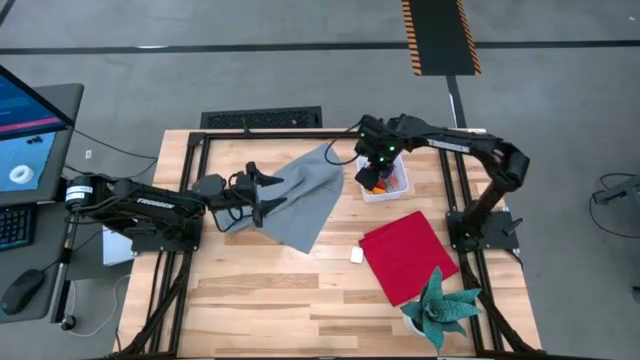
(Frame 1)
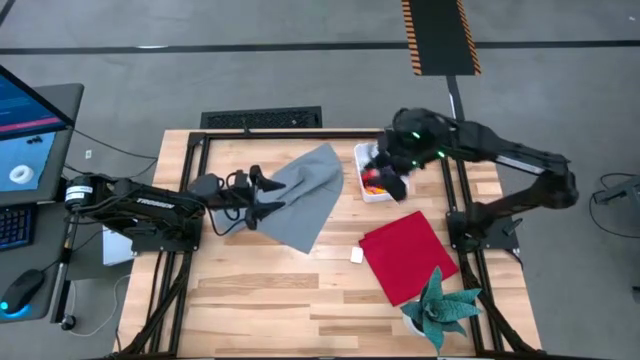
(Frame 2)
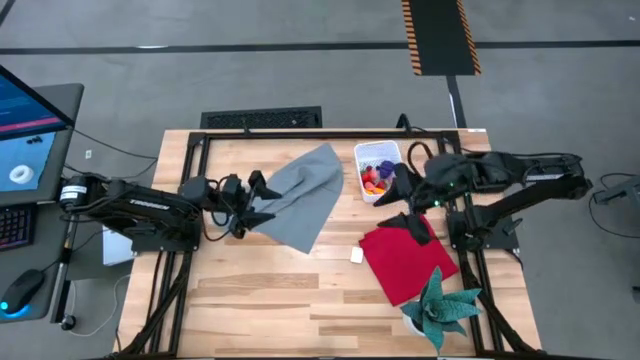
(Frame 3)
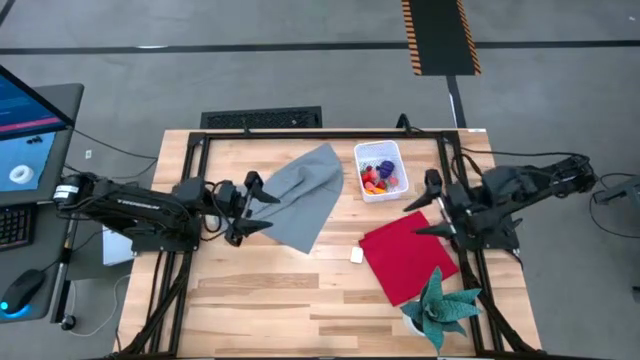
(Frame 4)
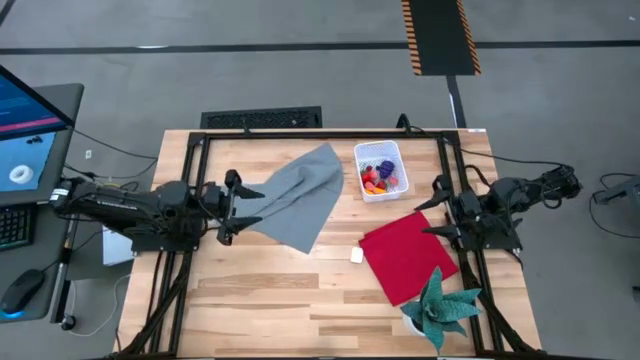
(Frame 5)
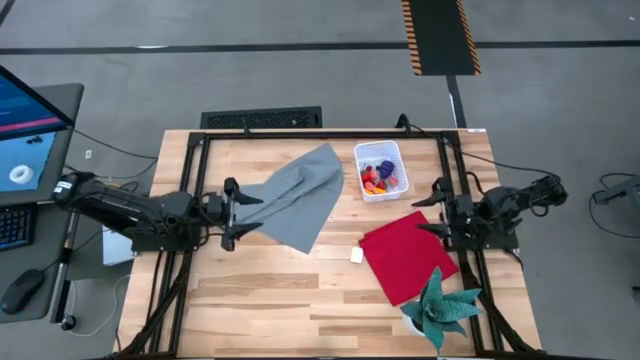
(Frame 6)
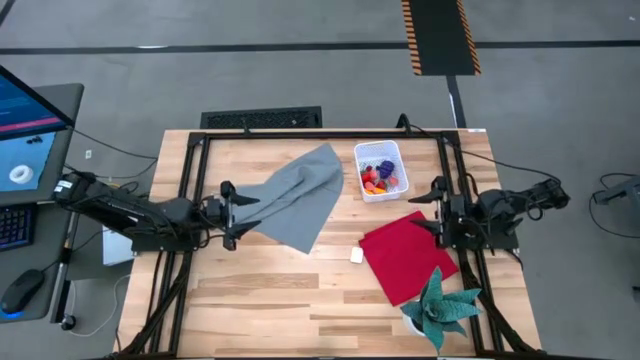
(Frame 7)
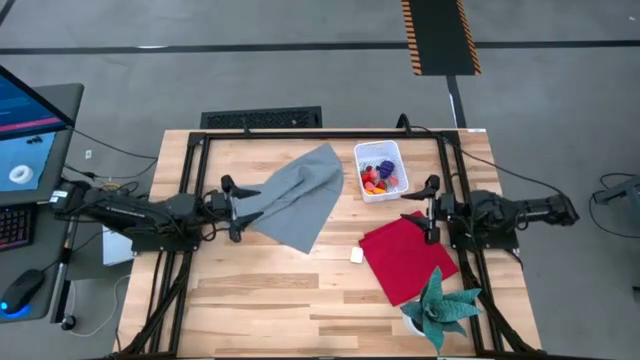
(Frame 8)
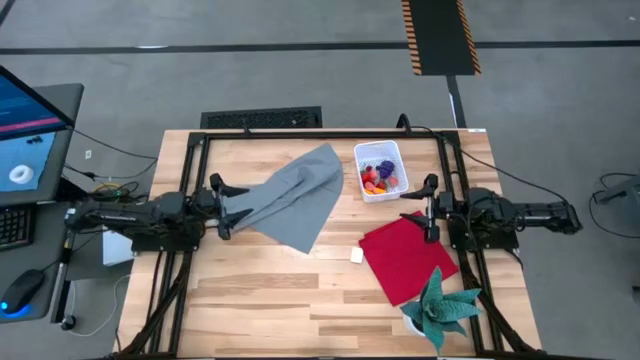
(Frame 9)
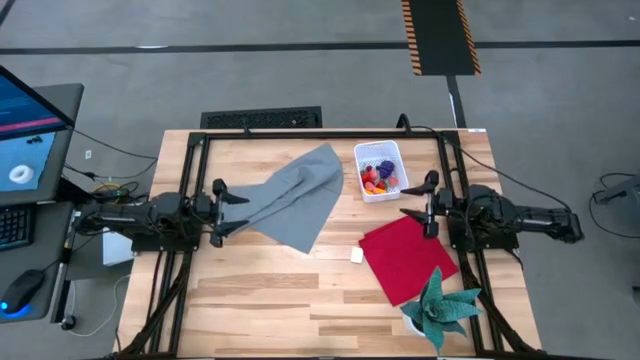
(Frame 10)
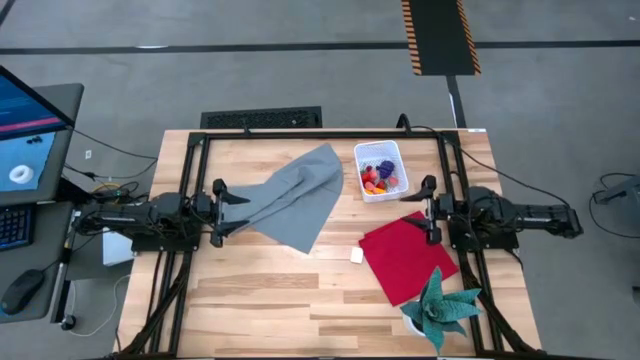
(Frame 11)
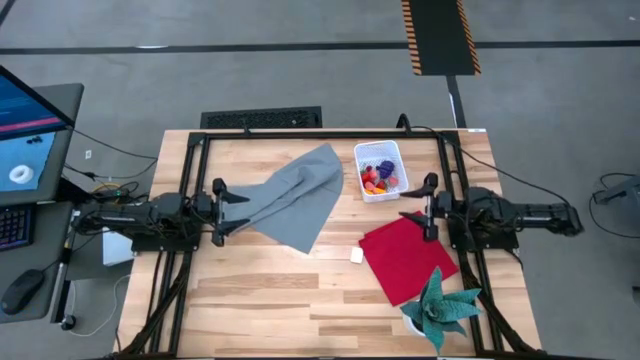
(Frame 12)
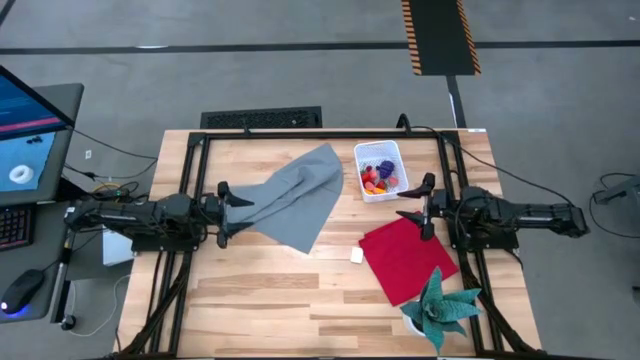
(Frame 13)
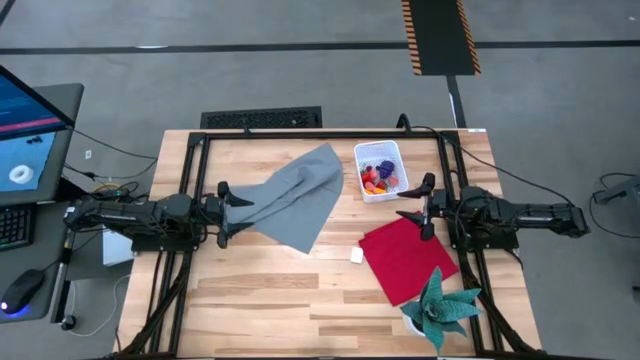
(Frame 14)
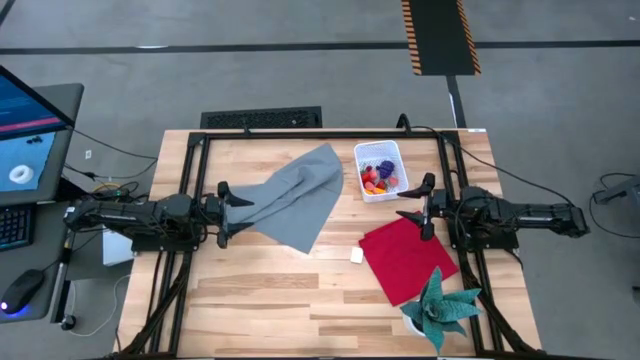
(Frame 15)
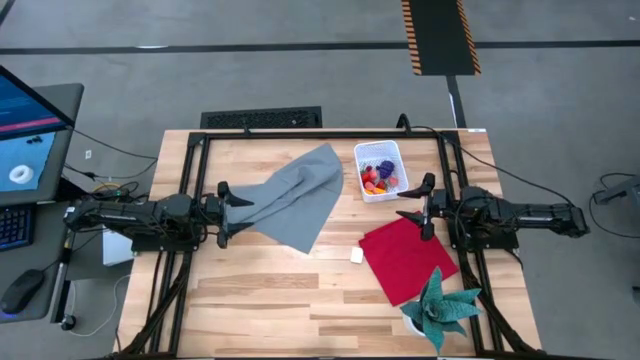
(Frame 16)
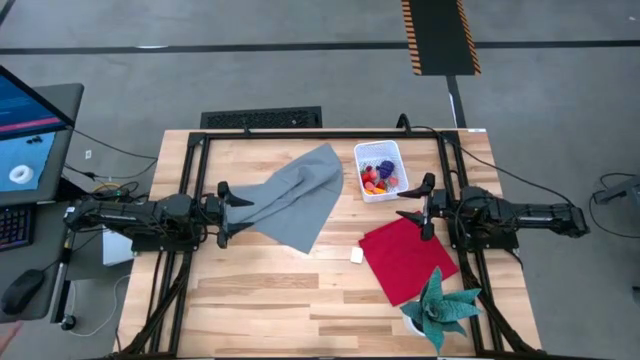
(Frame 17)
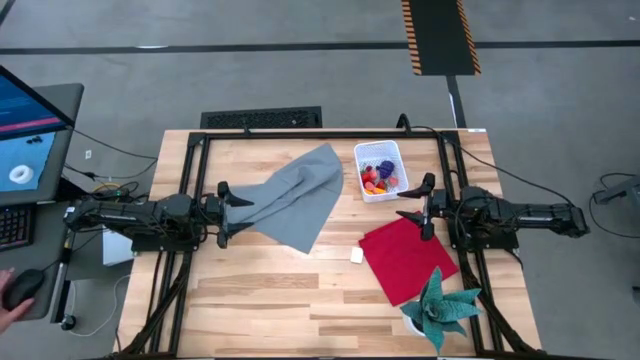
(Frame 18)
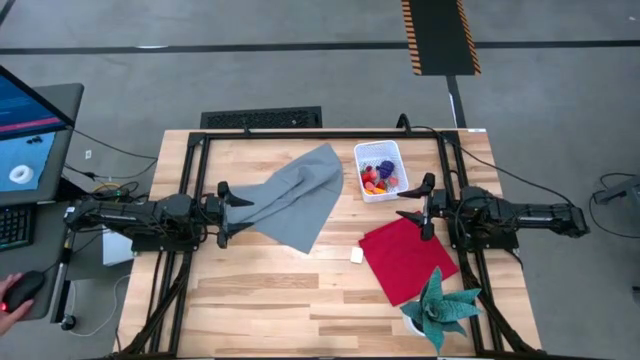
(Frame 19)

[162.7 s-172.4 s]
Task: Pick and placing Produce into tupperware
Return to Home Position

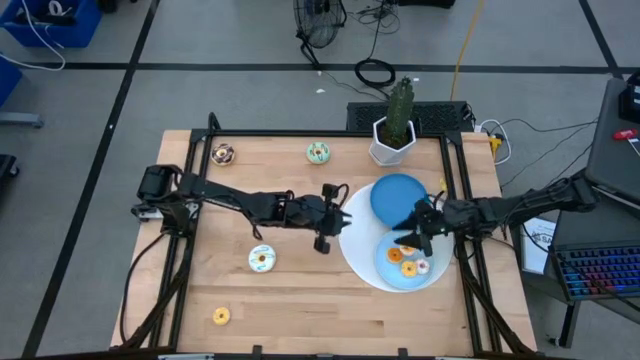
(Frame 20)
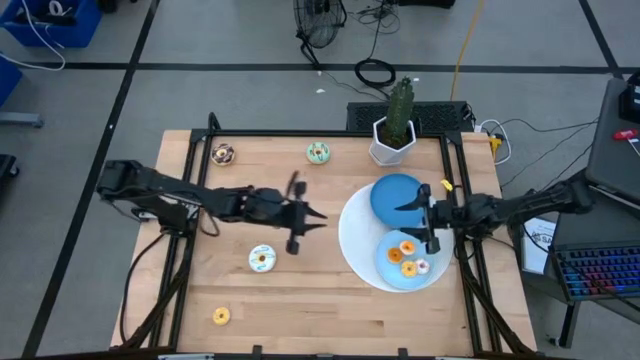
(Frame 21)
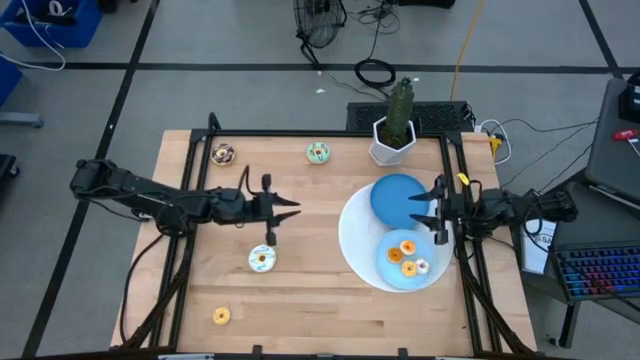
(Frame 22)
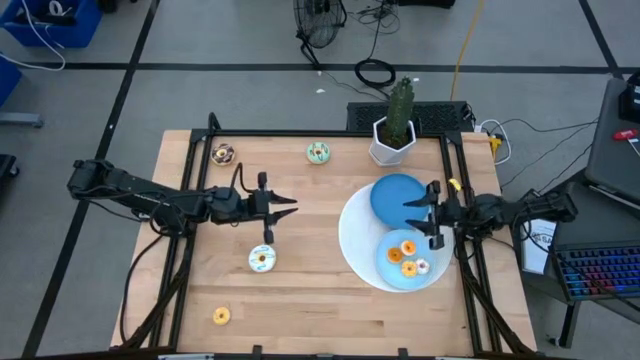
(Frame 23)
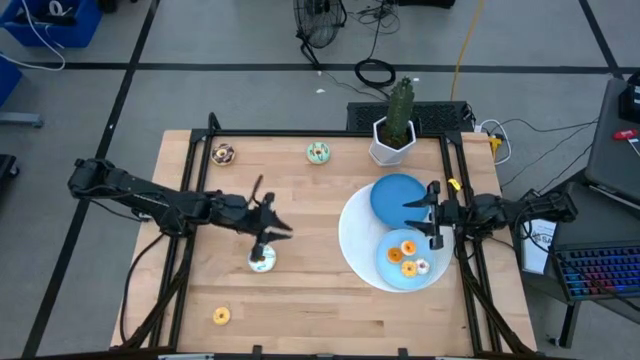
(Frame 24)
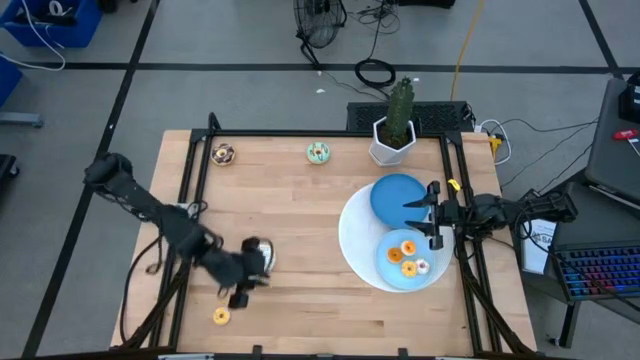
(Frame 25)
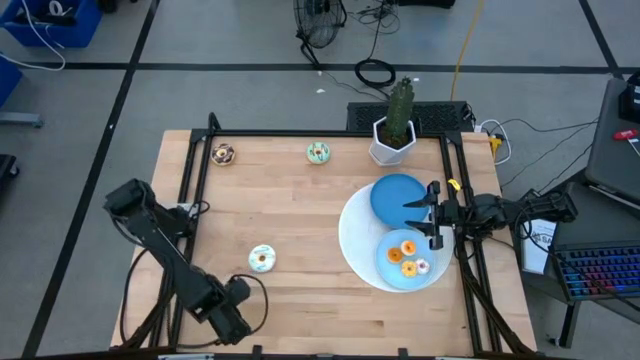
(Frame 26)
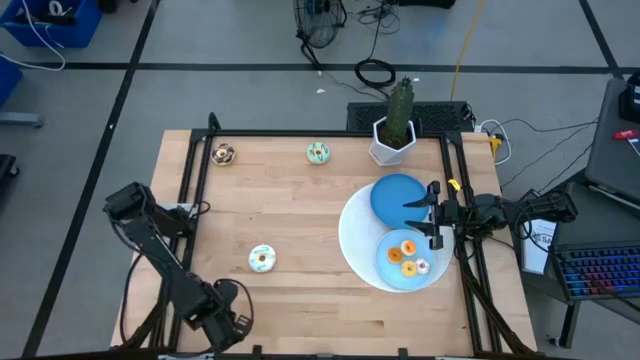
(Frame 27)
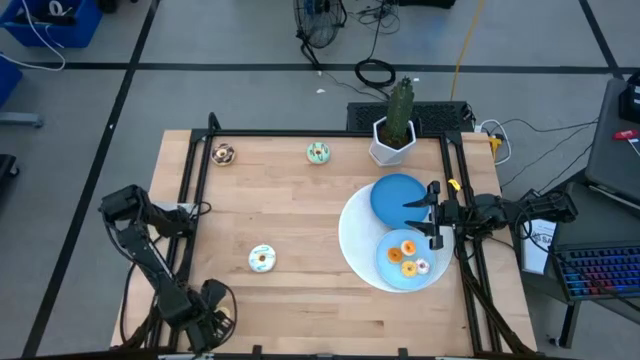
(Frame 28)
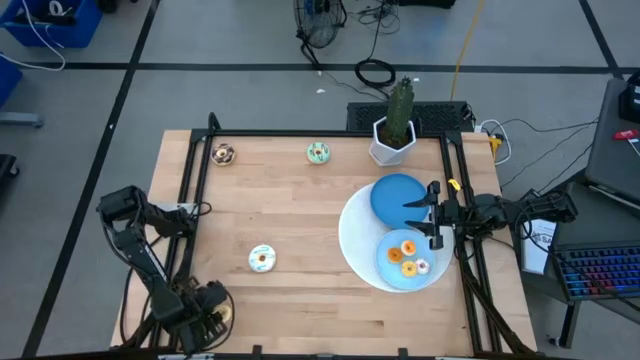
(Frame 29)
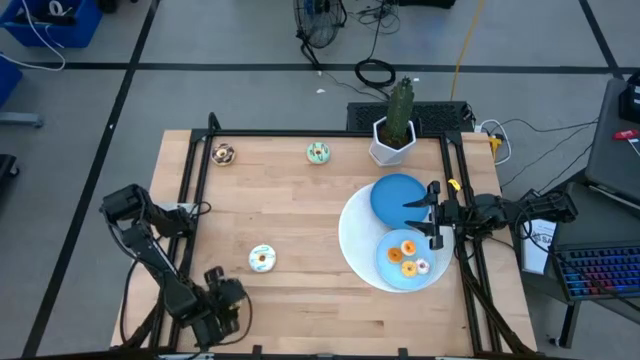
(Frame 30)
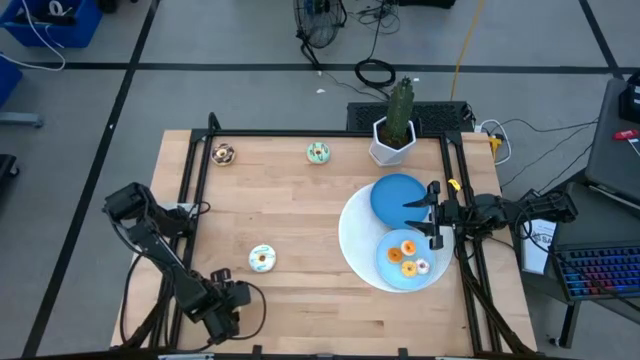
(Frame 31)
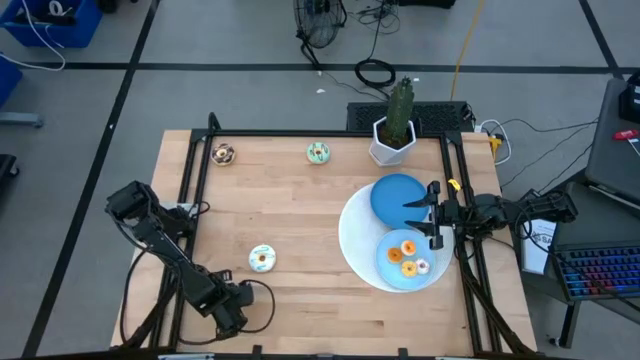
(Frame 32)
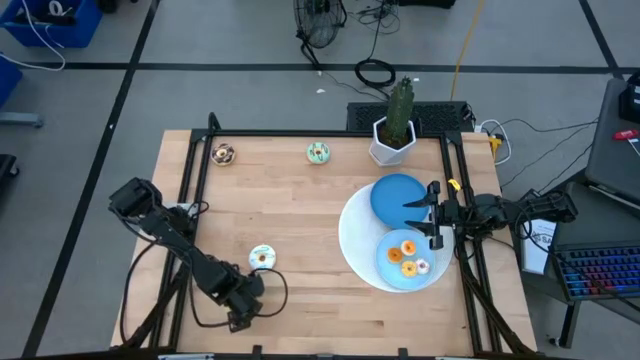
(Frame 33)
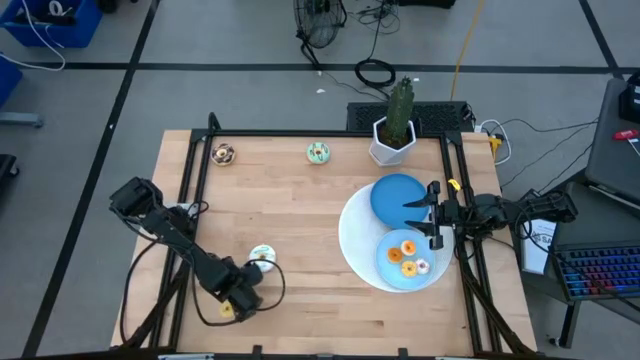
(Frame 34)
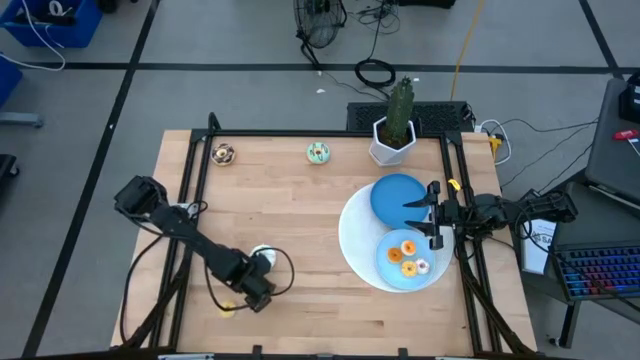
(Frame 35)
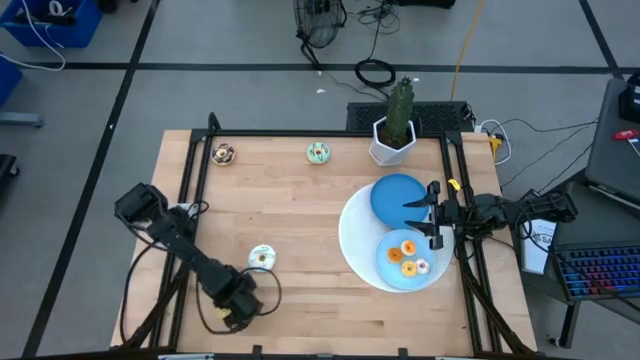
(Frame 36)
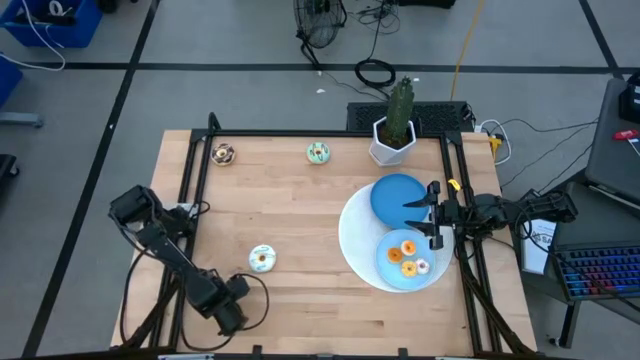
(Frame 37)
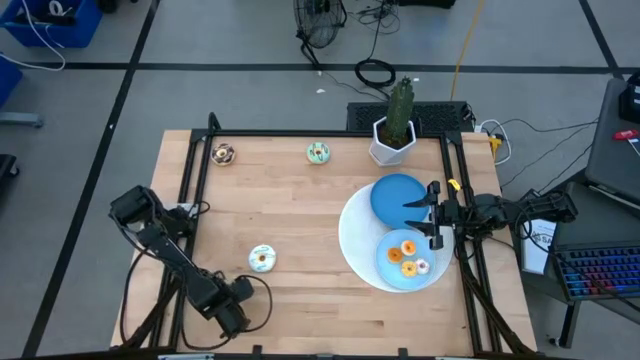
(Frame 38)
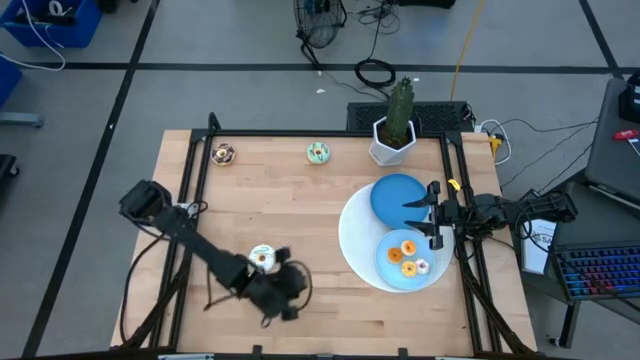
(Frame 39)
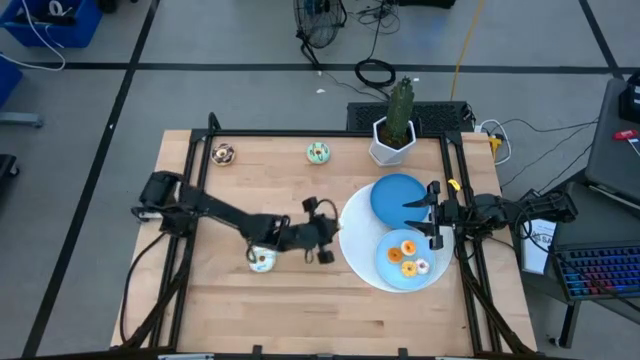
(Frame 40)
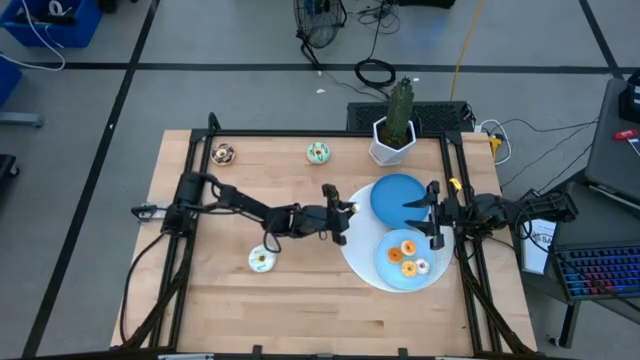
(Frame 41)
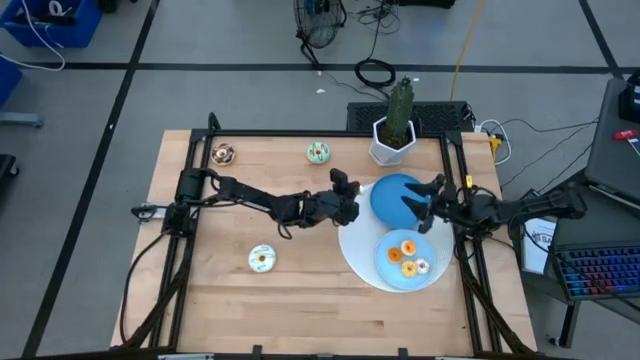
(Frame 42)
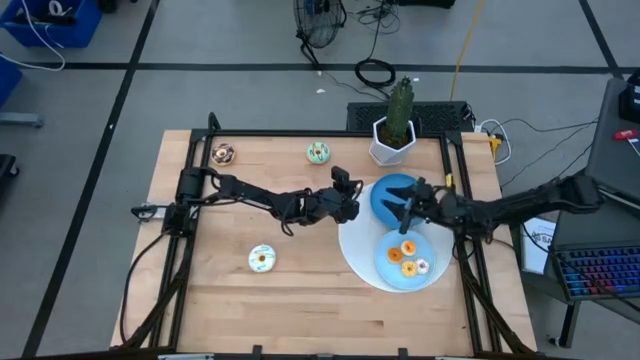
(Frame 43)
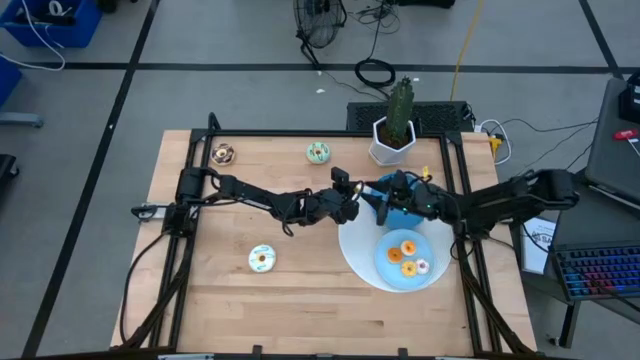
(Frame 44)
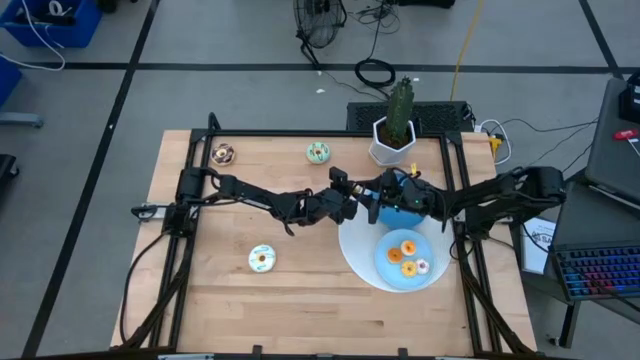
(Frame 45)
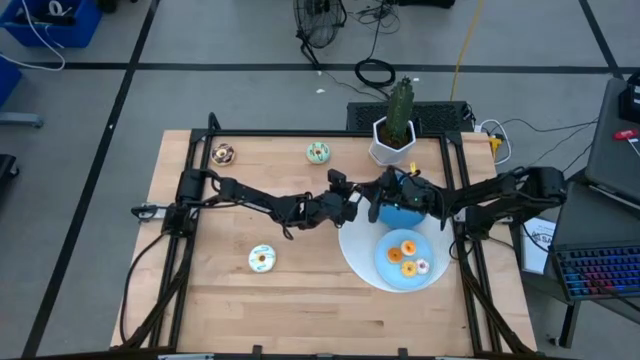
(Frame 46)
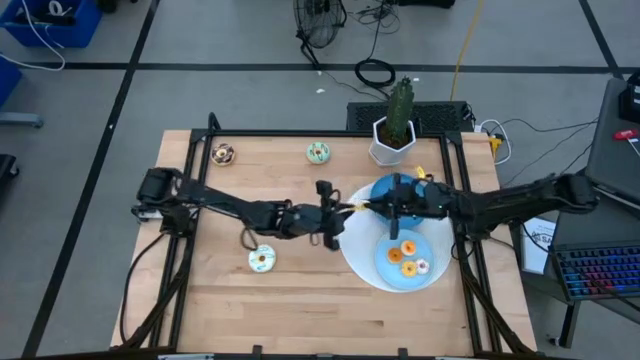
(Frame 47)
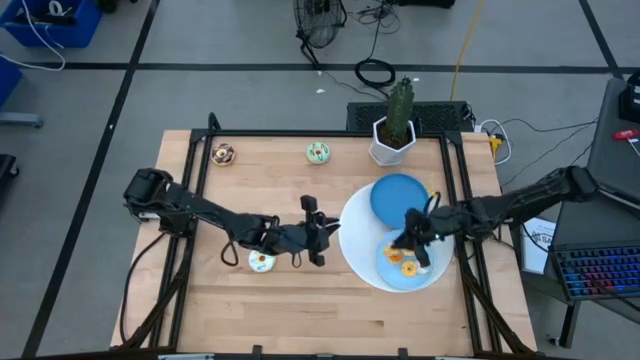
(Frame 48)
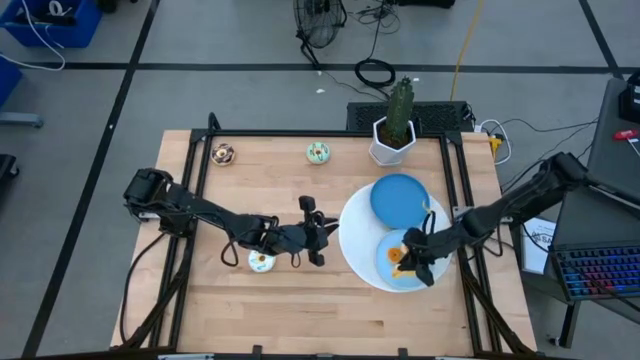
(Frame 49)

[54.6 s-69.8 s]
Task: Pick & Place donuts
Put the small yellow donut on the light blue plate
